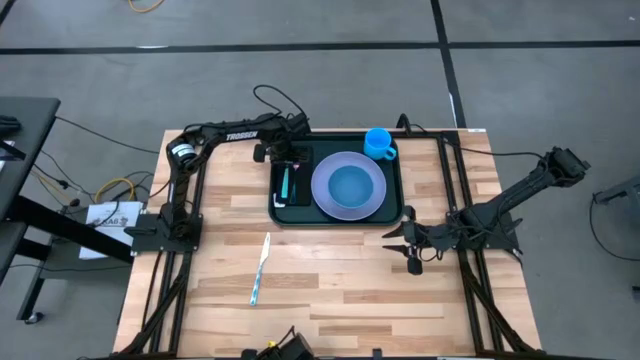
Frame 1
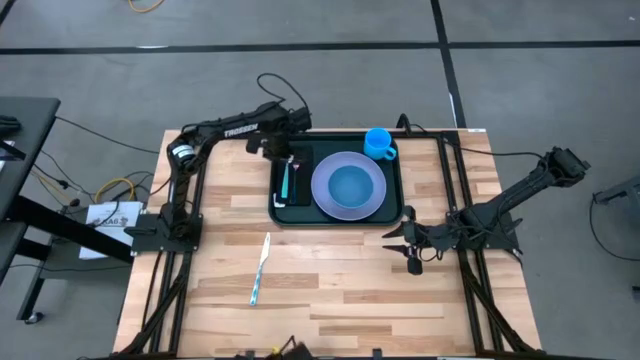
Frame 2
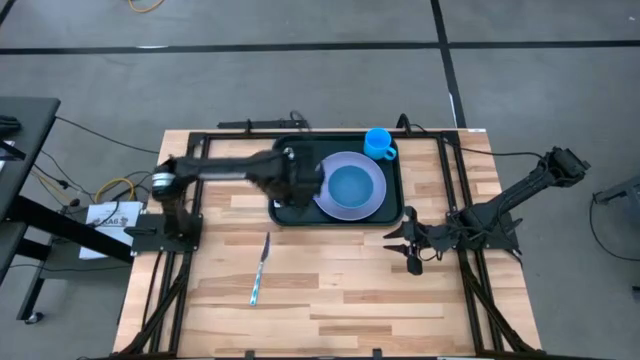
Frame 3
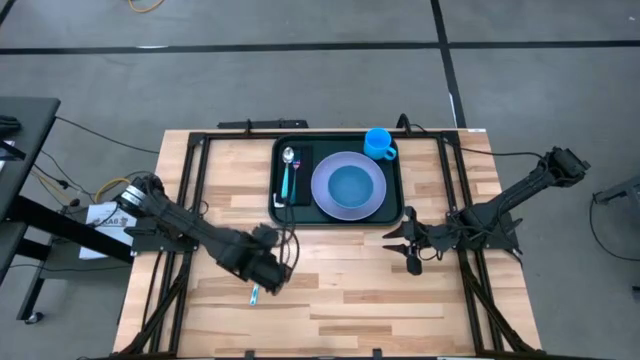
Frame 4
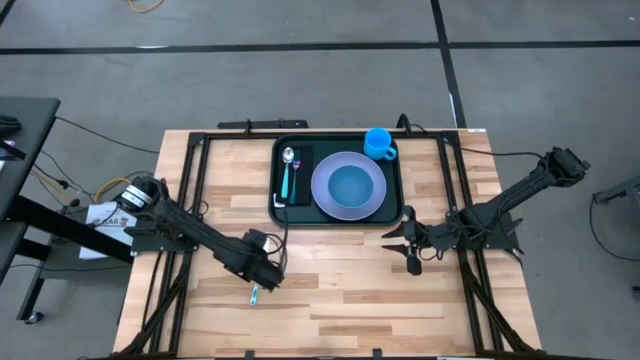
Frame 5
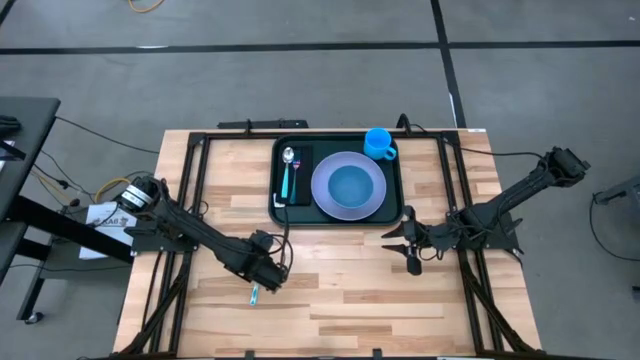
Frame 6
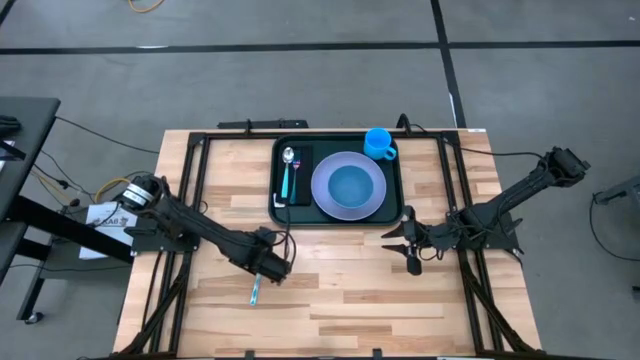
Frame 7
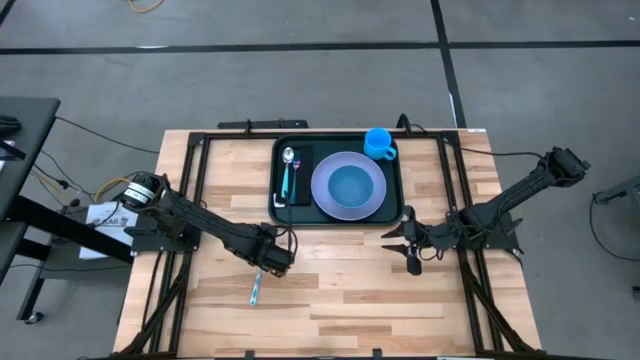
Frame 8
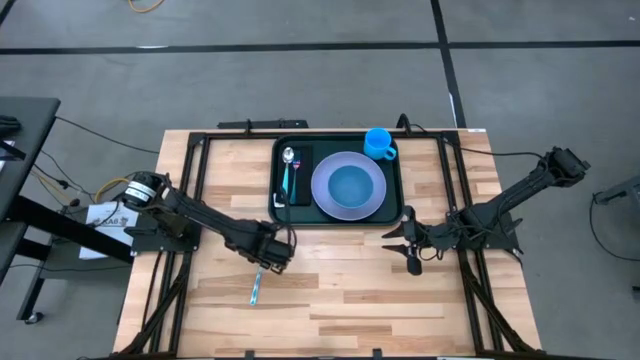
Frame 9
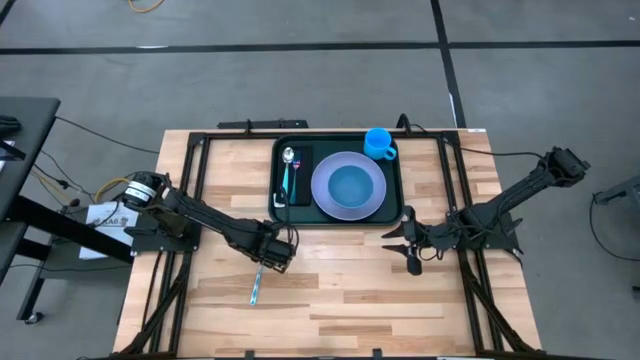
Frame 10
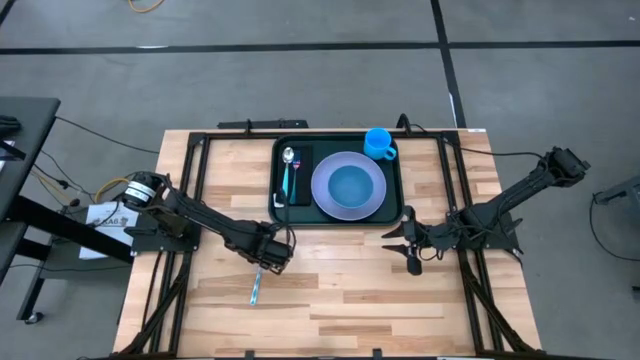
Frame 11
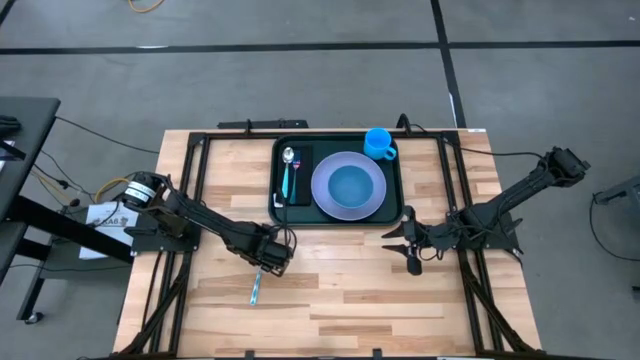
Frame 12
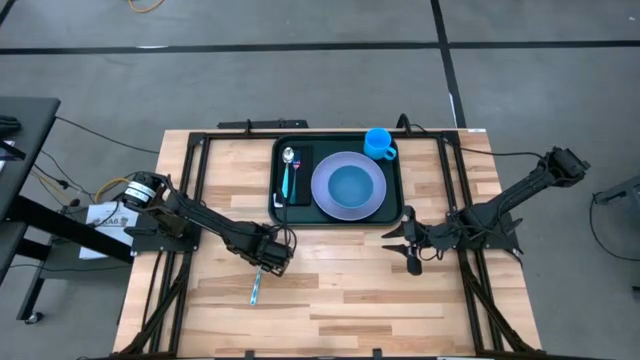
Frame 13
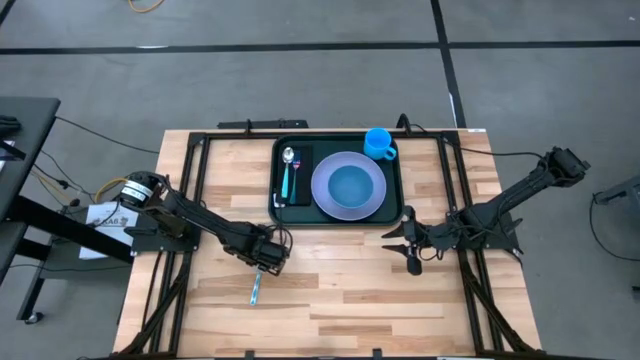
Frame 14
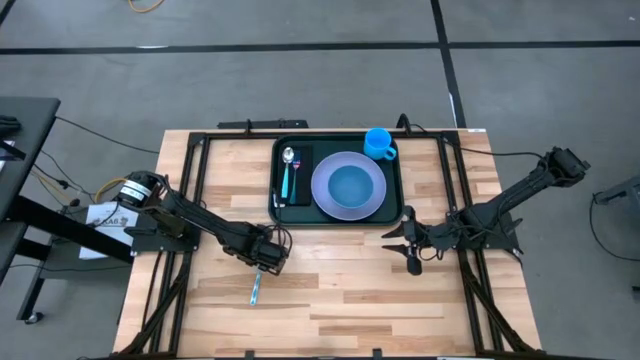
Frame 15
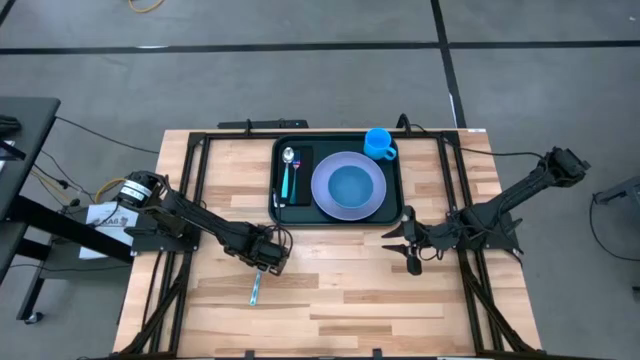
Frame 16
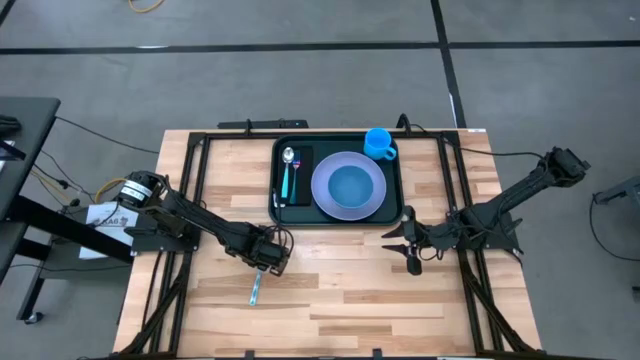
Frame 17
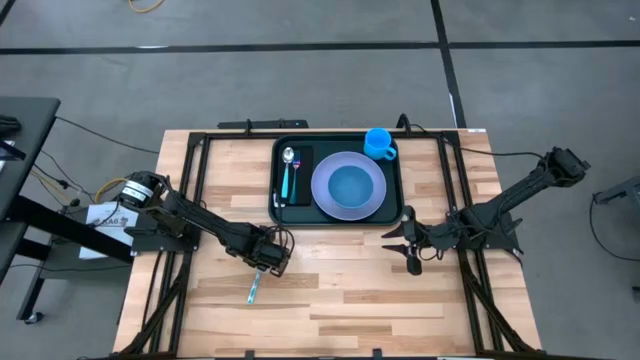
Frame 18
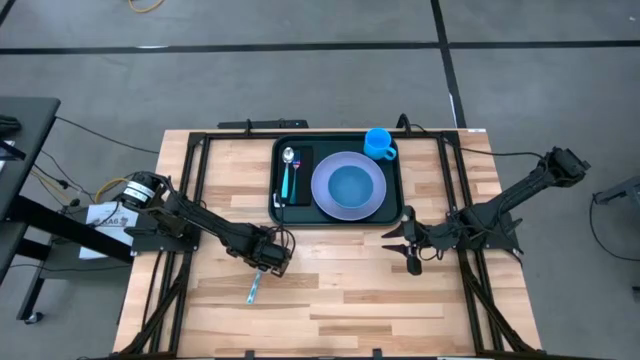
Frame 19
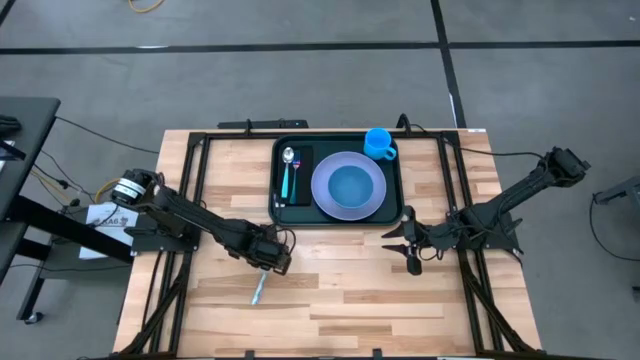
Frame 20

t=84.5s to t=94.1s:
Task: Set up tray
Put the blue patterned knife on top of the black napkin to the right side of the blue fork

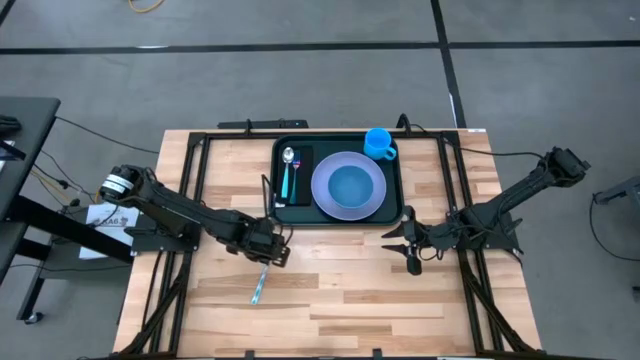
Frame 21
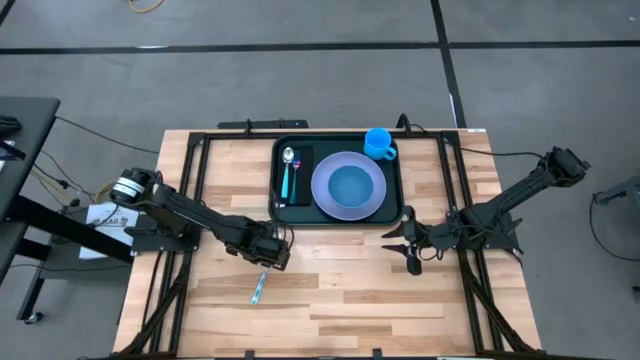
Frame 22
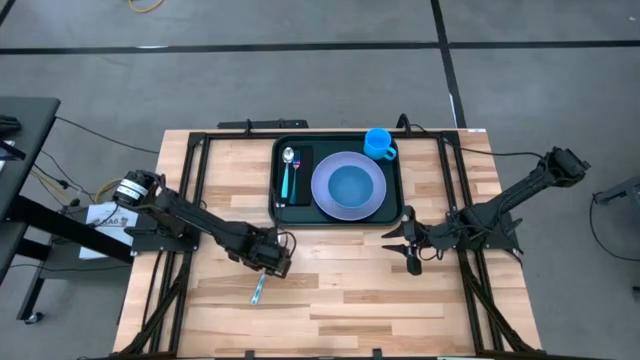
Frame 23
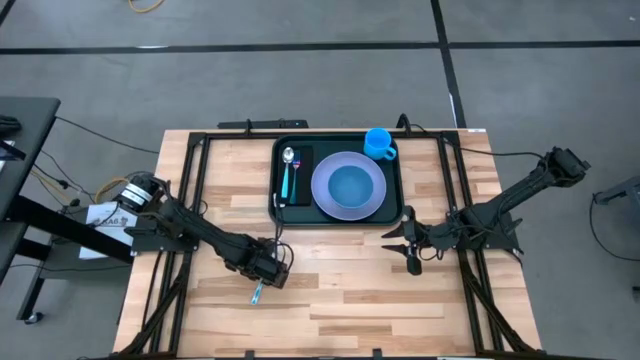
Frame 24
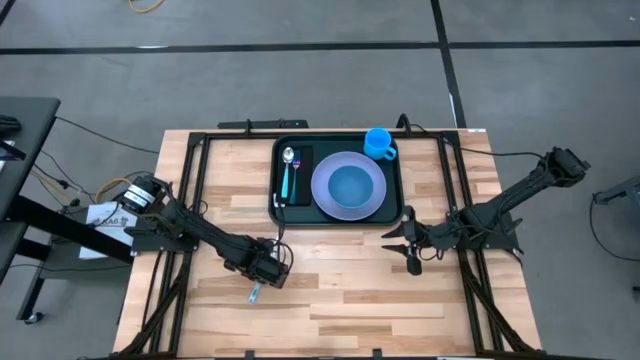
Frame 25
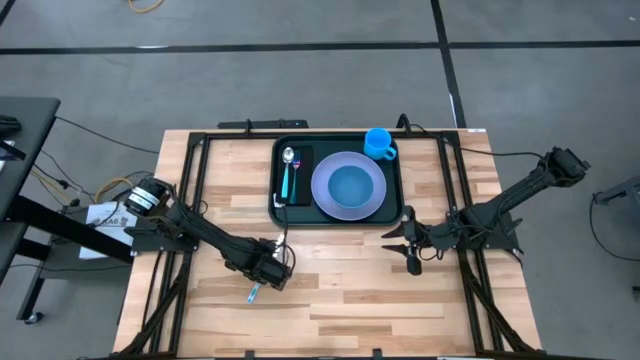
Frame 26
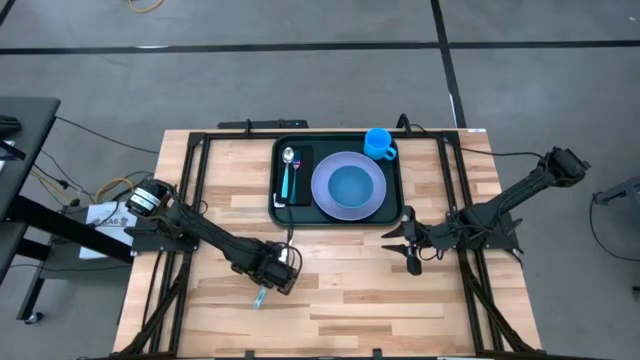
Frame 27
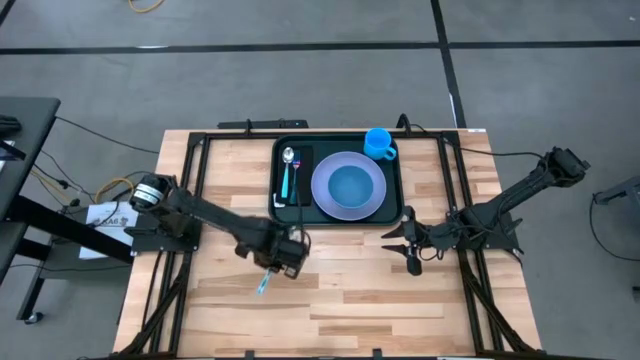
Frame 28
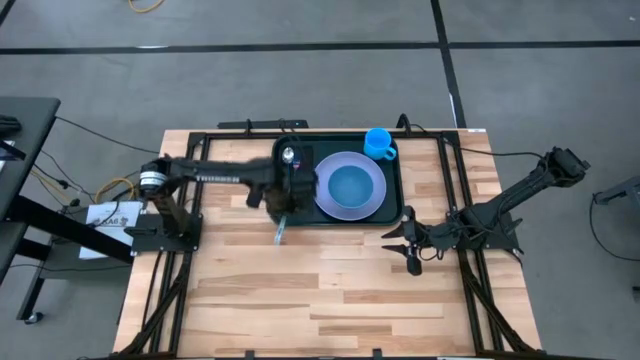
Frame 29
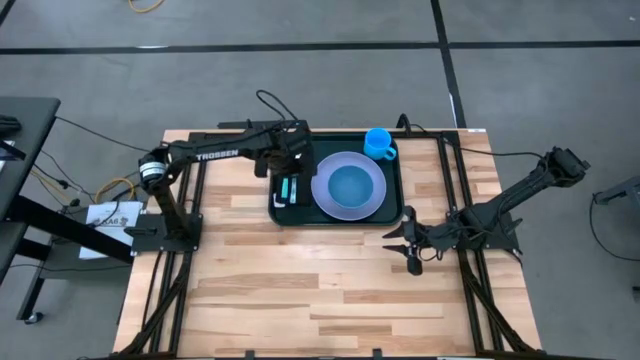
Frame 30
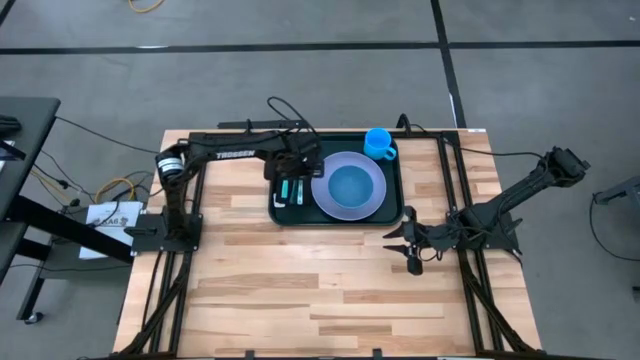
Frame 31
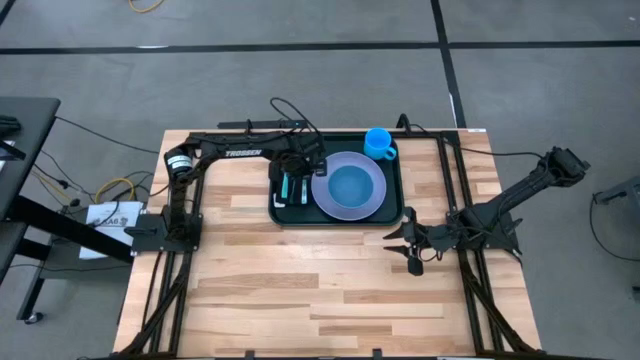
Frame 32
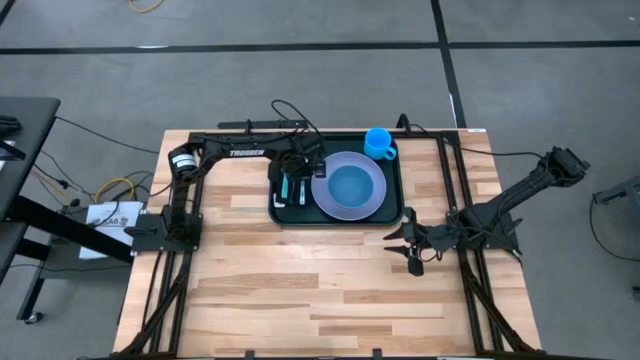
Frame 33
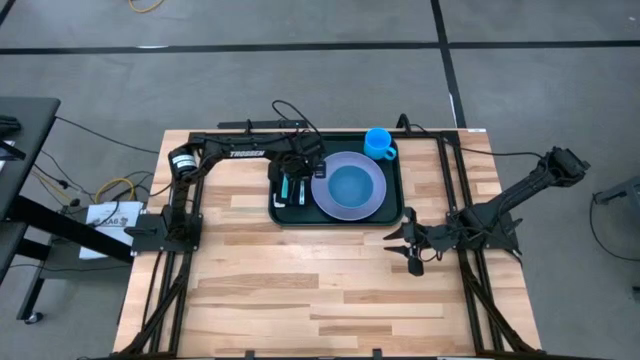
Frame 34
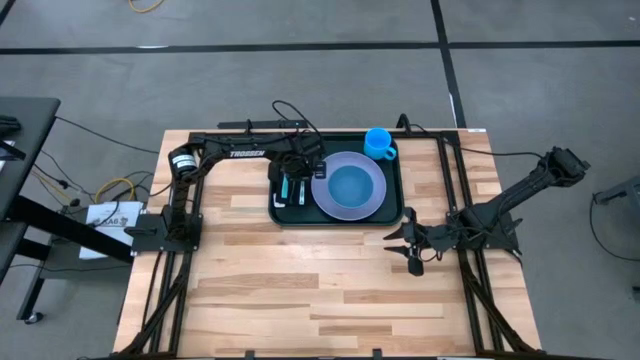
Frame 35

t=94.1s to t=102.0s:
Put the blue patterned knife on top of the black napkin to the right side of the blue fork

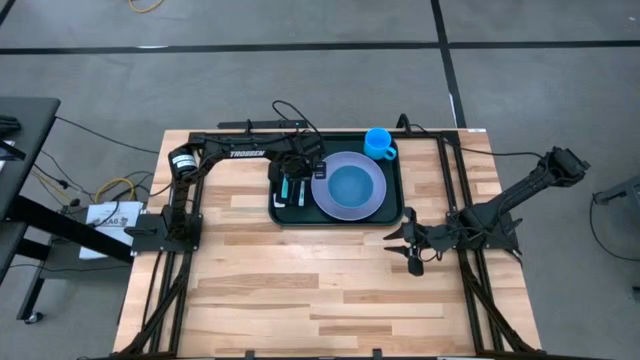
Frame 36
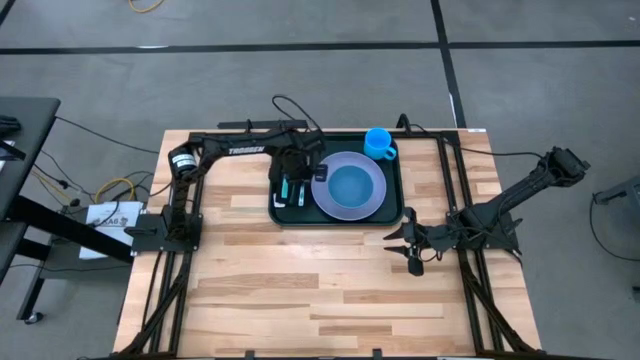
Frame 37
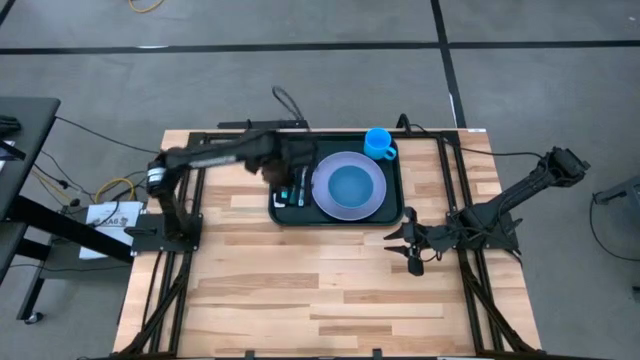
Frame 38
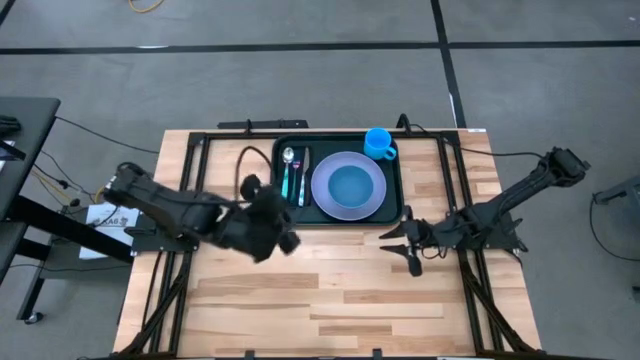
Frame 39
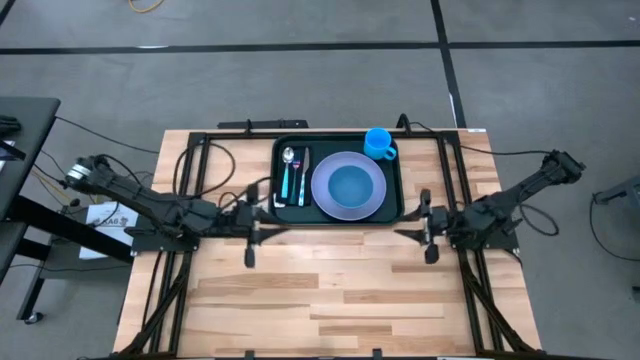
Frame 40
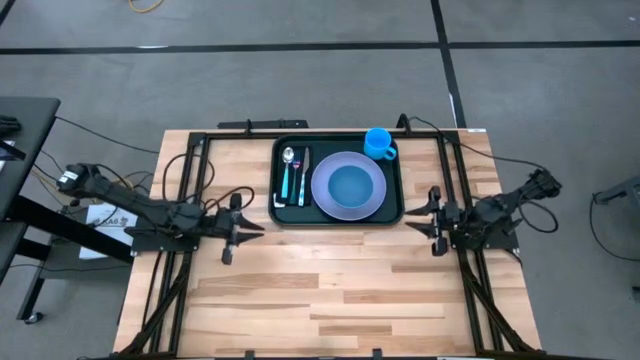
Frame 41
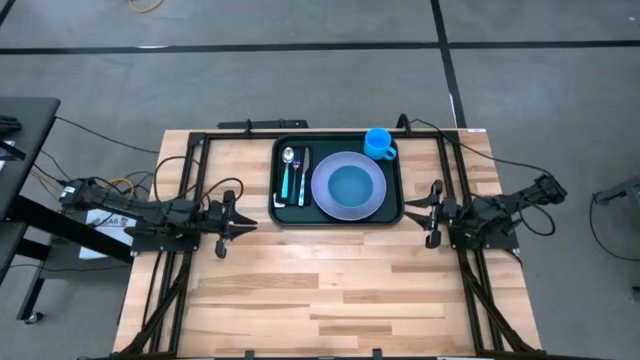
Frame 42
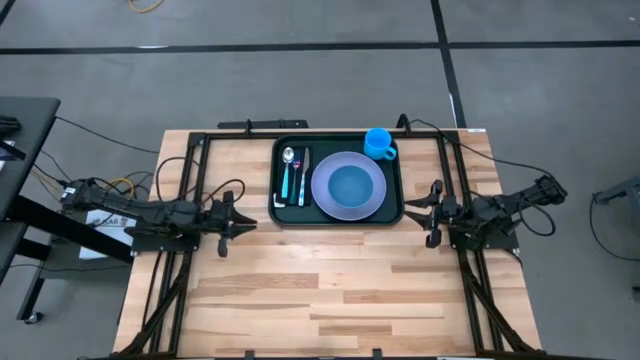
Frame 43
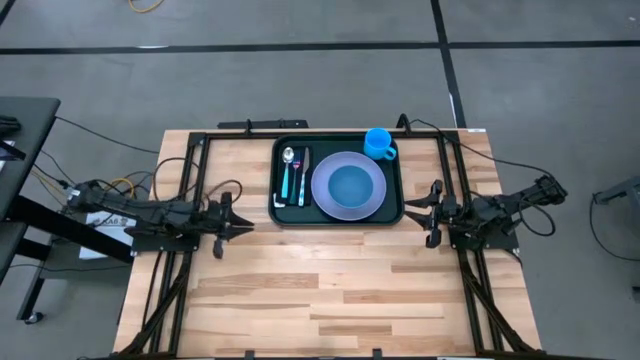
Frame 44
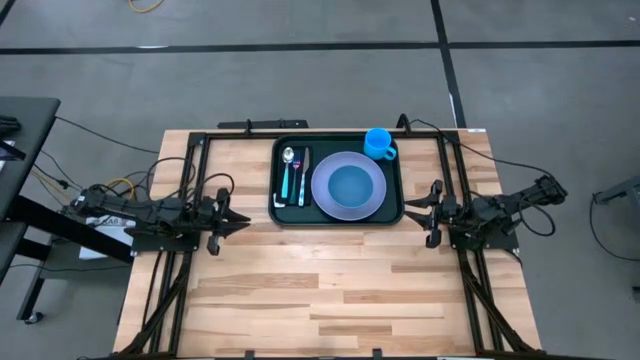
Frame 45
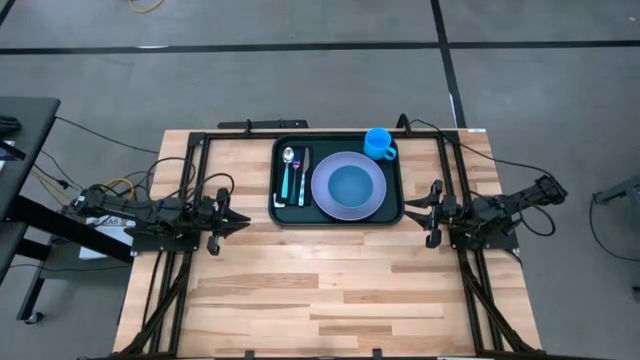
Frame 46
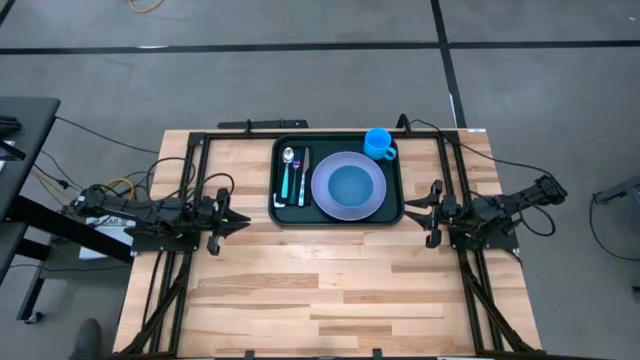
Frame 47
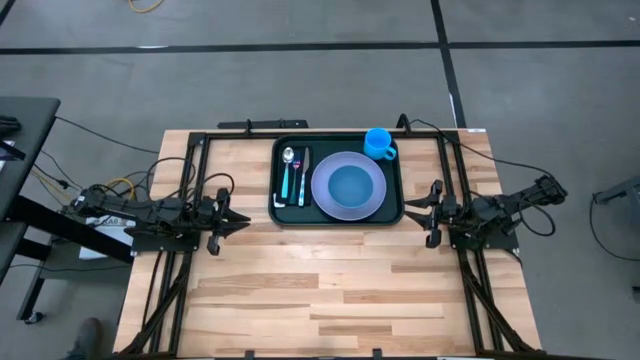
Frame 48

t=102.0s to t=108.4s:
Return to Home Position
